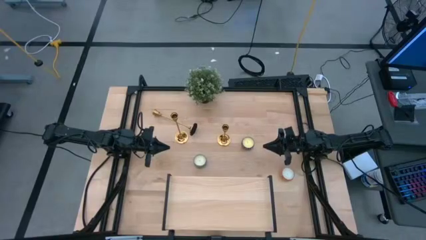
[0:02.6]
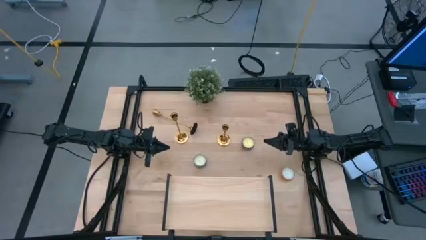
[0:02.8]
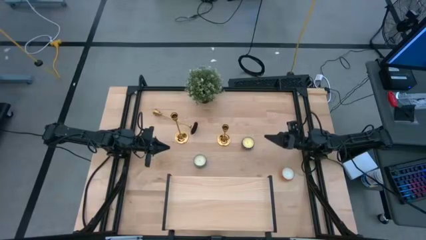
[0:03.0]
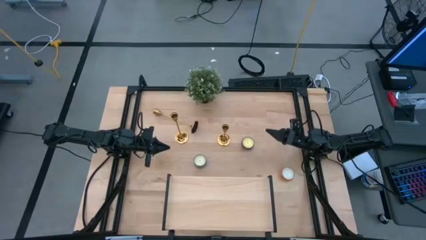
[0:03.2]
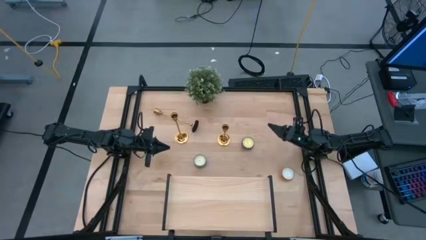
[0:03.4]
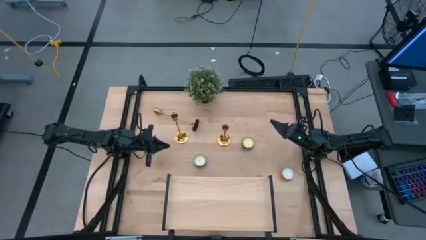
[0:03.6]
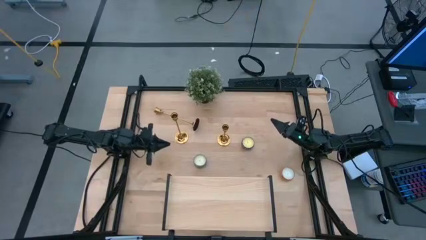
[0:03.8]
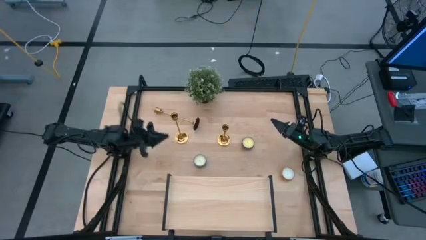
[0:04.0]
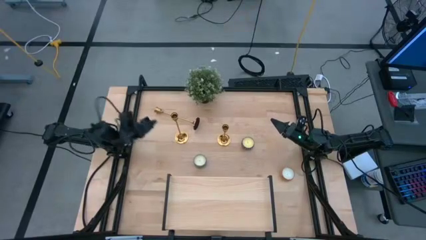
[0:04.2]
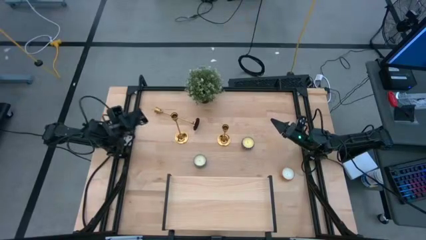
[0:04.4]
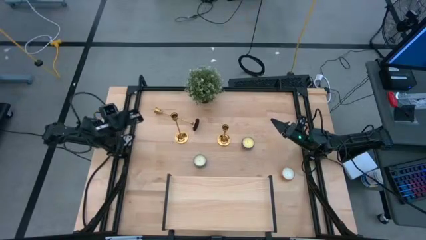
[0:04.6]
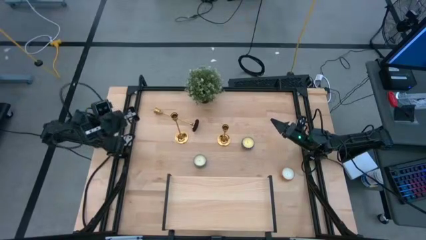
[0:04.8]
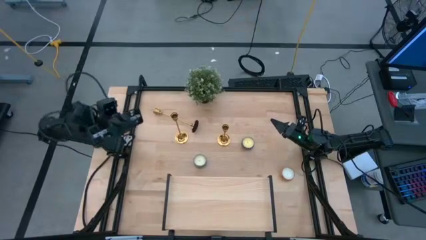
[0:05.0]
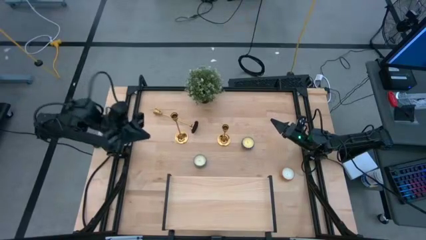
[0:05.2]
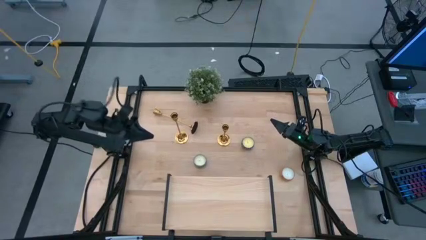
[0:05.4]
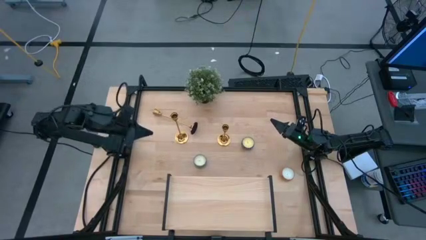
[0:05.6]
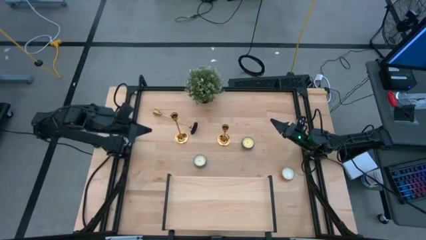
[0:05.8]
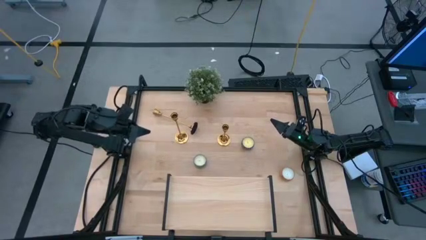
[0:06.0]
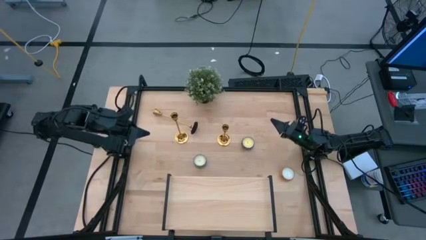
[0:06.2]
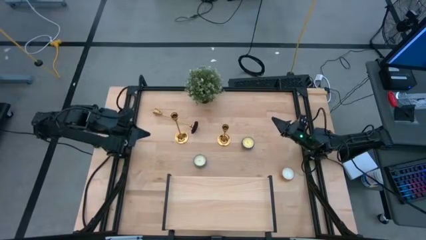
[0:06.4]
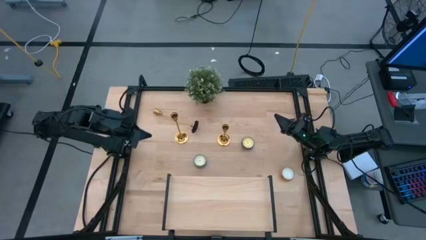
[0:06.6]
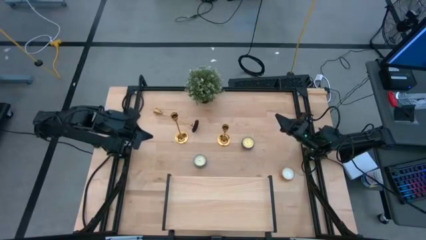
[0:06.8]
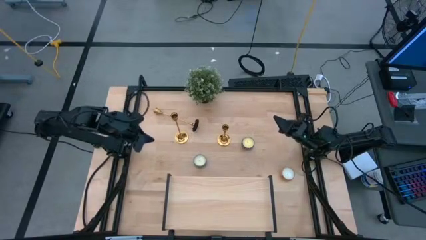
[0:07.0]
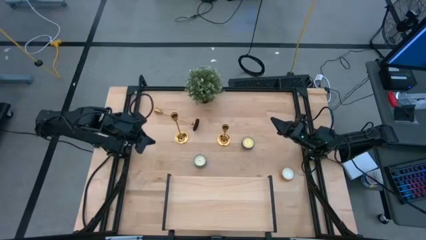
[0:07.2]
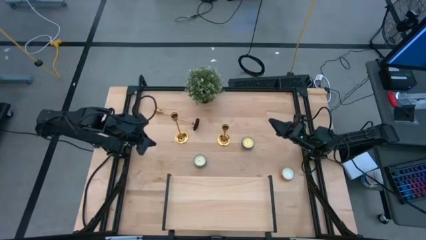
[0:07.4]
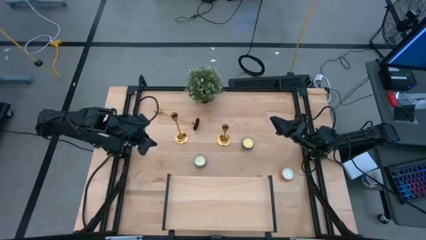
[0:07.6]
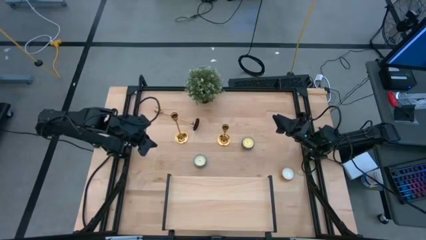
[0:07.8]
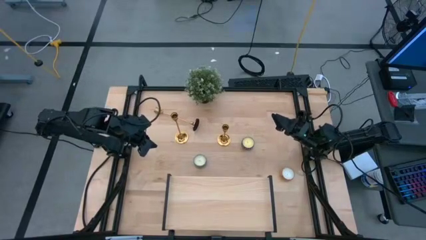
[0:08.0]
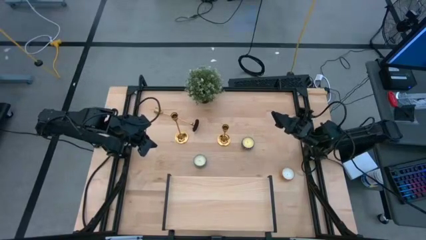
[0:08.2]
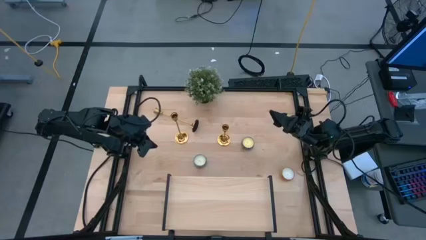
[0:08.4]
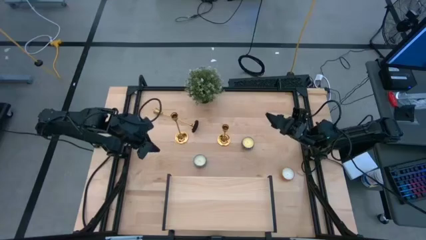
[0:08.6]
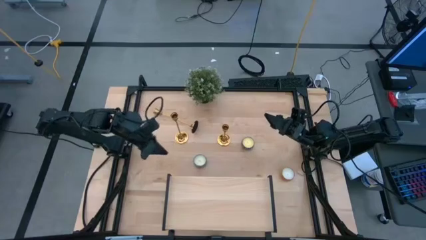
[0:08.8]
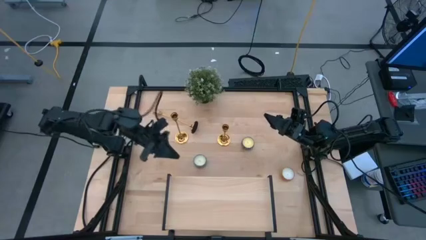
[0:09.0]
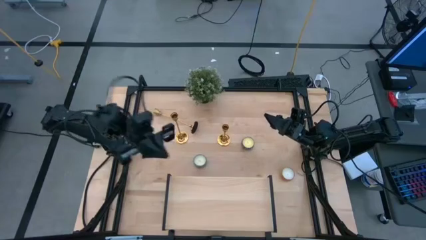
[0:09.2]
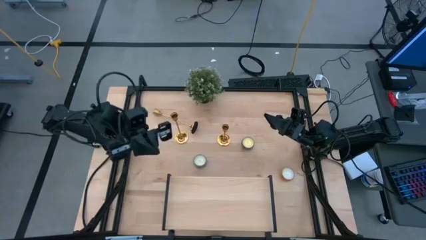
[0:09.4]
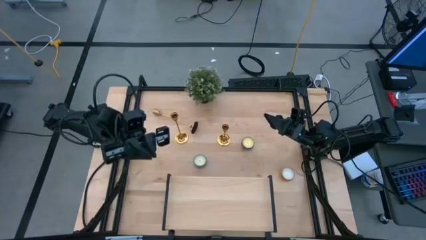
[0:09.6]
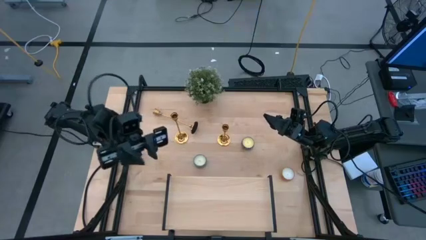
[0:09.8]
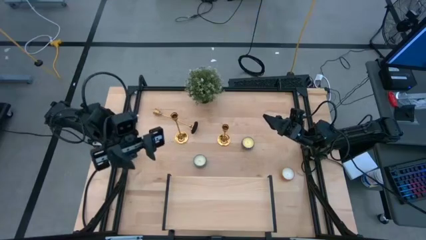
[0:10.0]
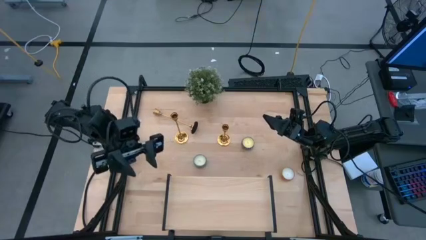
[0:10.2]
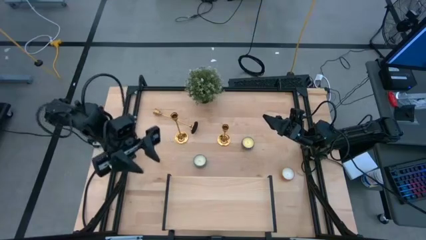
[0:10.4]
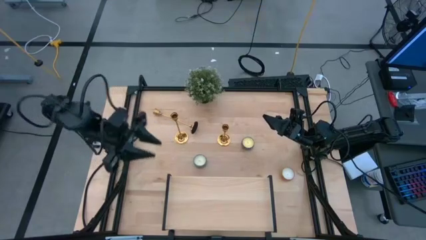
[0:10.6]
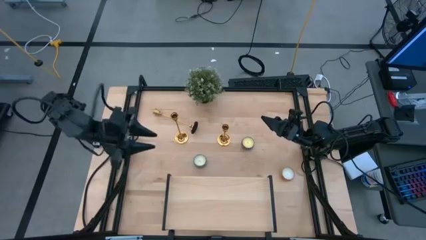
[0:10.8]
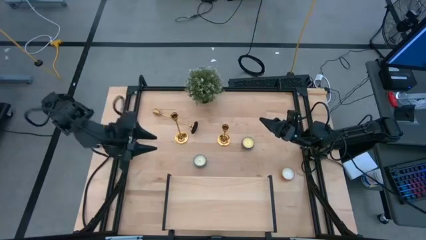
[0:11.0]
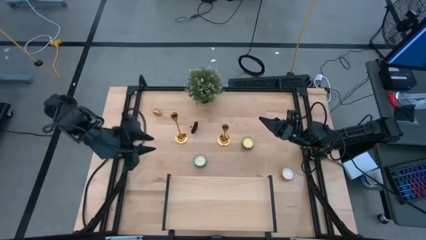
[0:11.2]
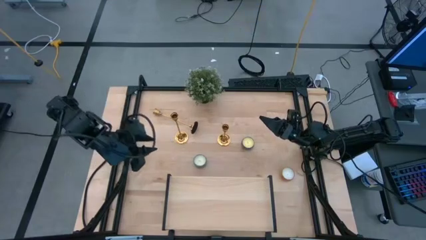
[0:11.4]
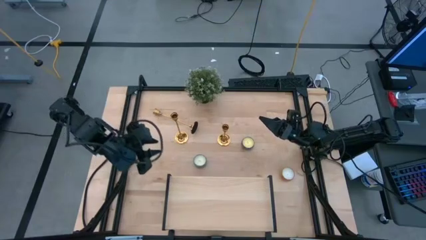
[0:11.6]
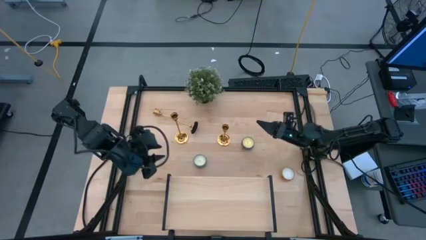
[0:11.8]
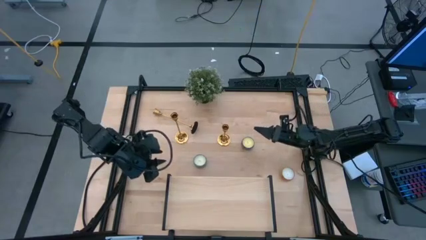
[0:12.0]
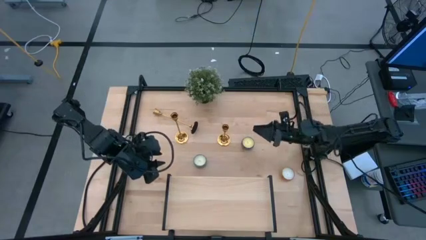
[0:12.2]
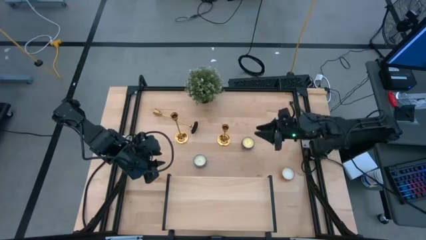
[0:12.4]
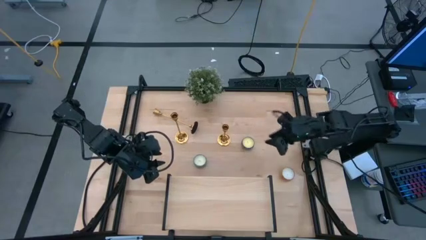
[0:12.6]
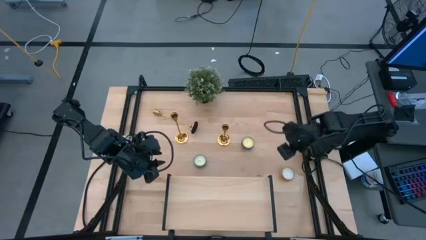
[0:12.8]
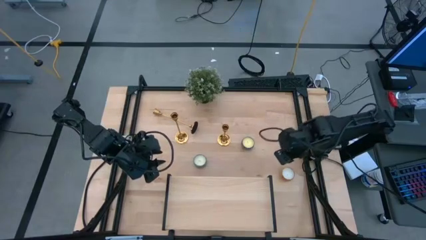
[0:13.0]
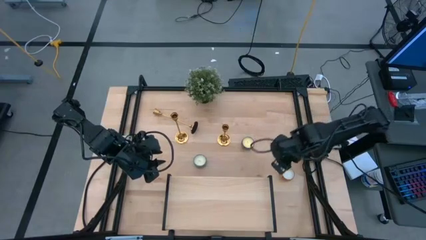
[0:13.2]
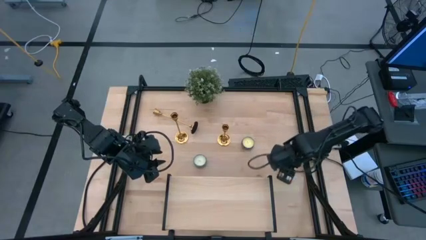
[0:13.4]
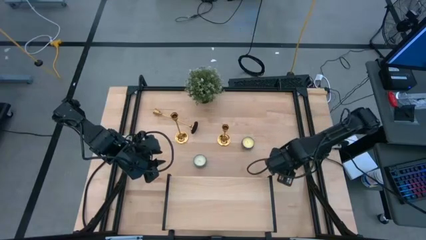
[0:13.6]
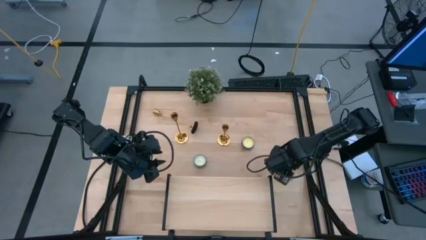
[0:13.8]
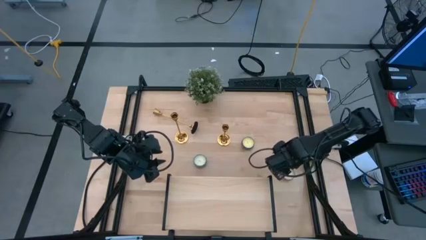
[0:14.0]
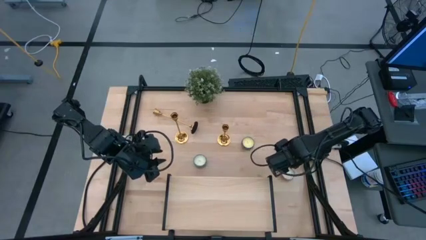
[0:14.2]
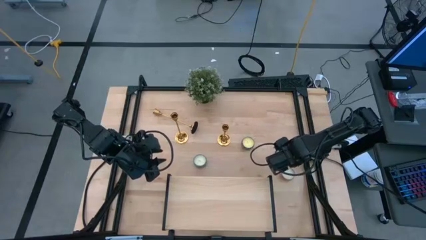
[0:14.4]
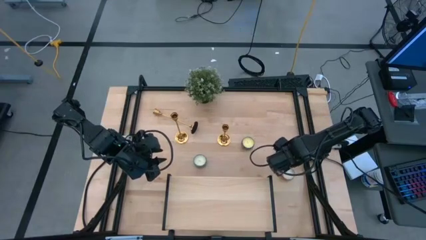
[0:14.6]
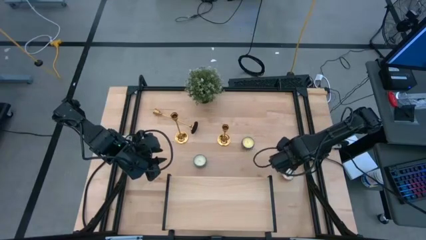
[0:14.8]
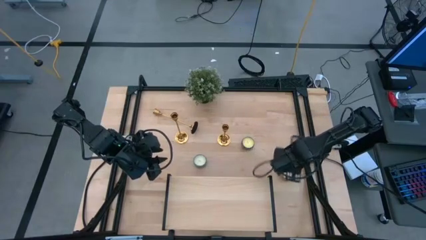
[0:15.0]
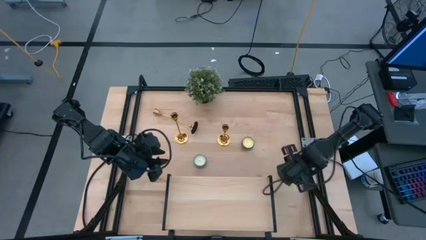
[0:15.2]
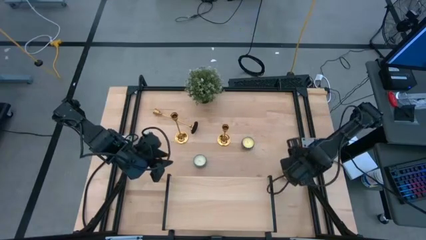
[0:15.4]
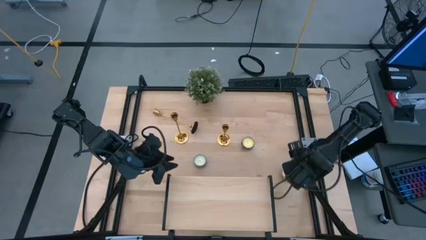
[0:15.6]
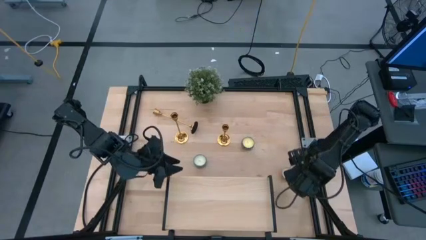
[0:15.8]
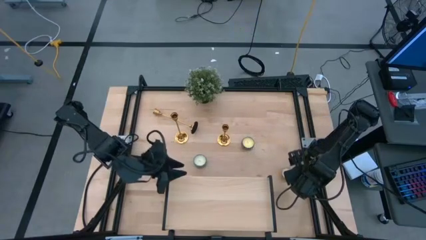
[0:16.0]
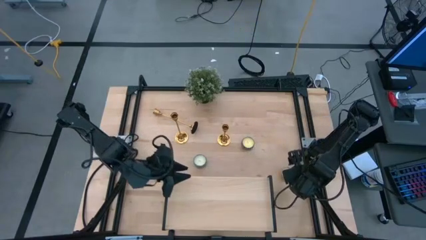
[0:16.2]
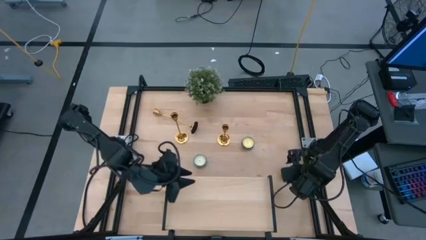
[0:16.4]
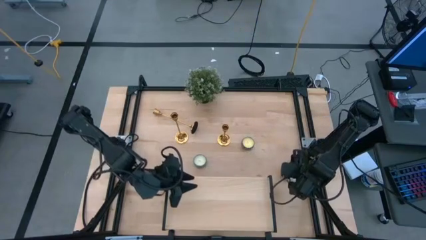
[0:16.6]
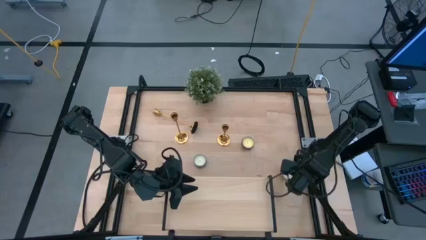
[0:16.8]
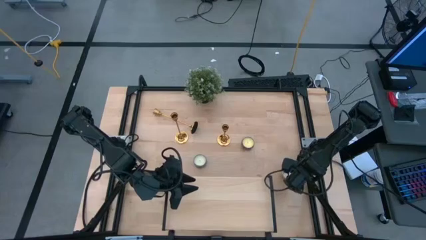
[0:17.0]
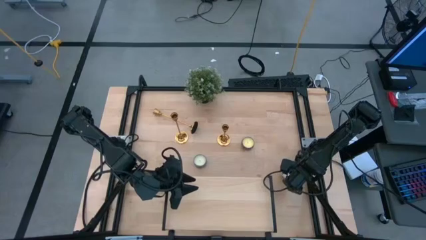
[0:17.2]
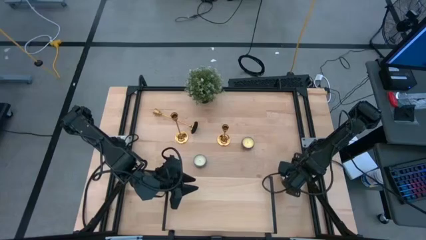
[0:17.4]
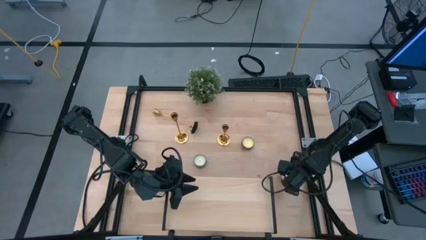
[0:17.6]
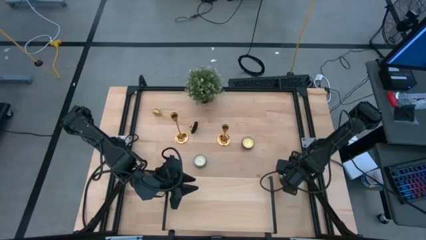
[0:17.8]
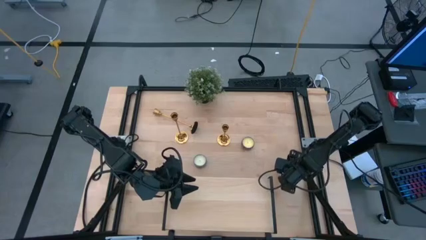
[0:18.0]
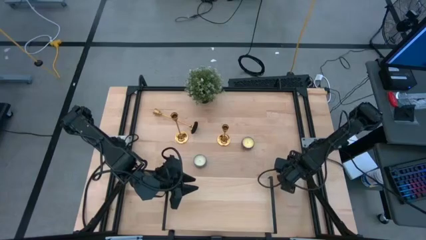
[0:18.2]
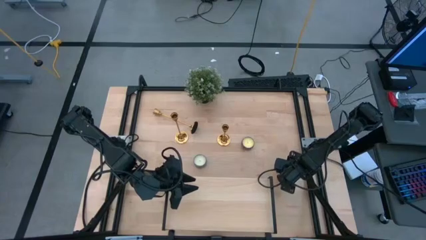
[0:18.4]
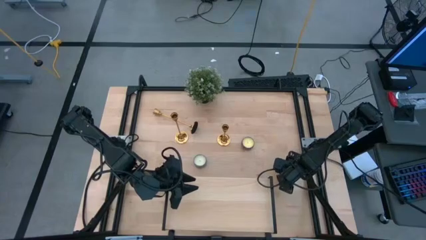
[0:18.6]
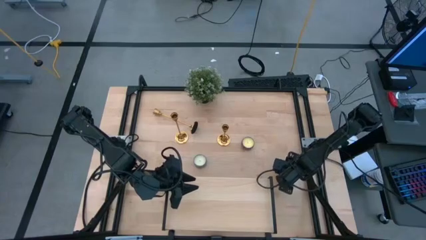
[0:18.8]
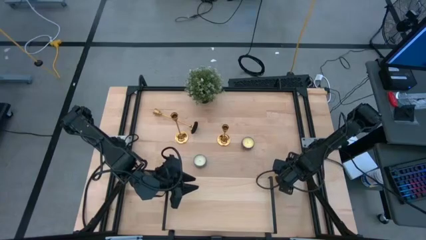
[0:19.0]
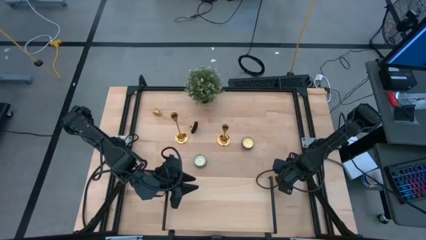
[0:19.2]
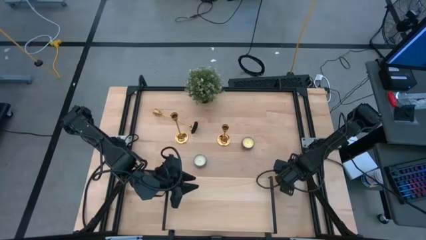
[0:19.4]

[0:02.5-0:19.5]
Task: Pick & Place candle stick holders
Put the yellow scented candle on the shelf
